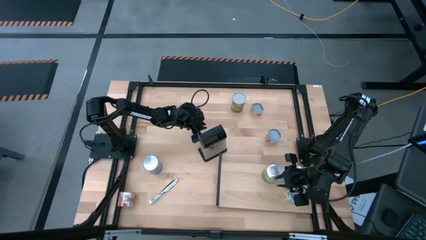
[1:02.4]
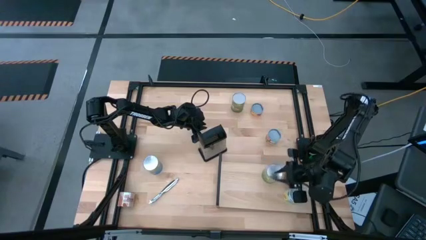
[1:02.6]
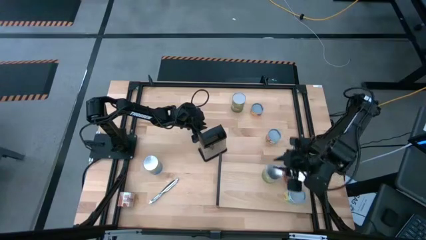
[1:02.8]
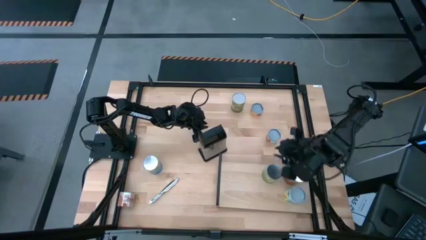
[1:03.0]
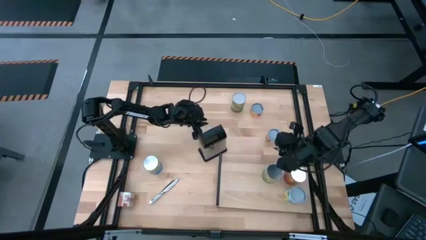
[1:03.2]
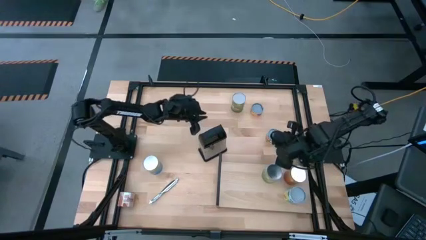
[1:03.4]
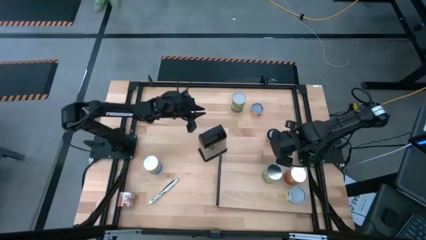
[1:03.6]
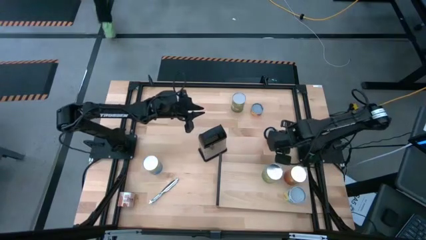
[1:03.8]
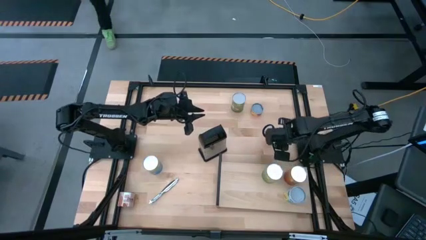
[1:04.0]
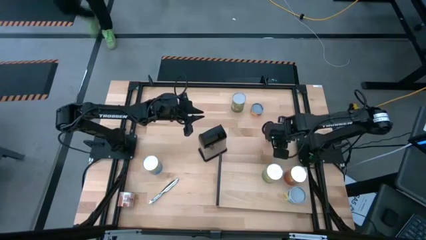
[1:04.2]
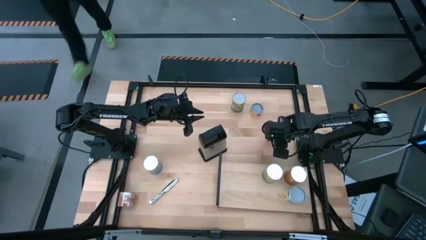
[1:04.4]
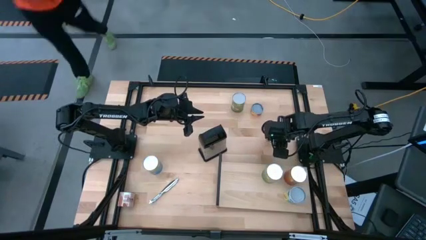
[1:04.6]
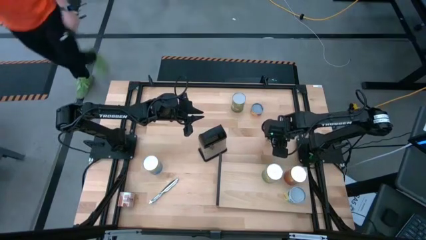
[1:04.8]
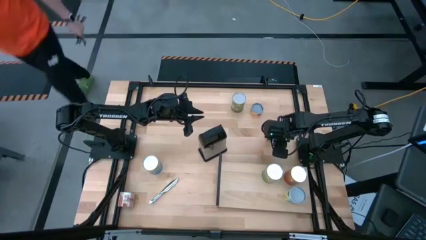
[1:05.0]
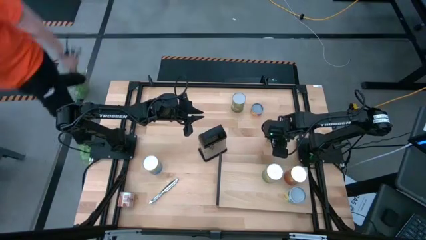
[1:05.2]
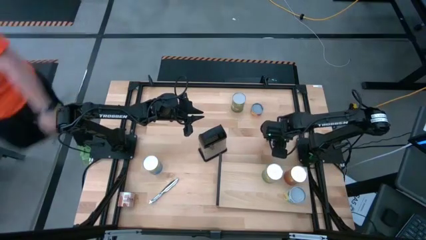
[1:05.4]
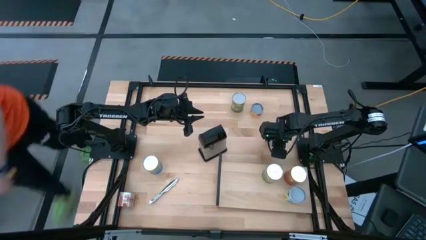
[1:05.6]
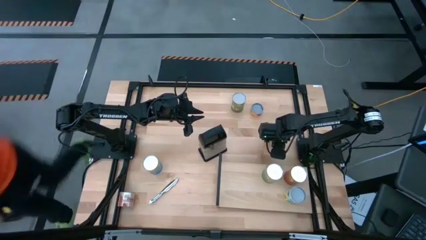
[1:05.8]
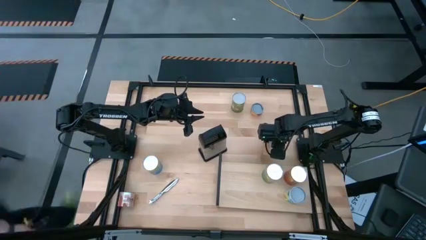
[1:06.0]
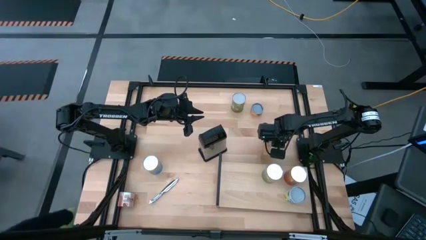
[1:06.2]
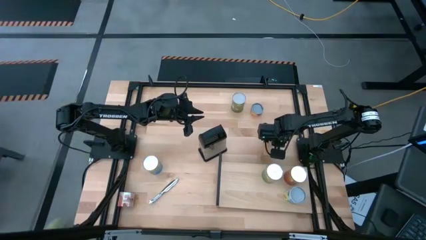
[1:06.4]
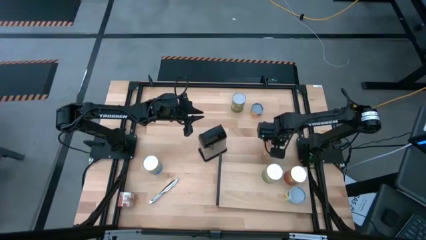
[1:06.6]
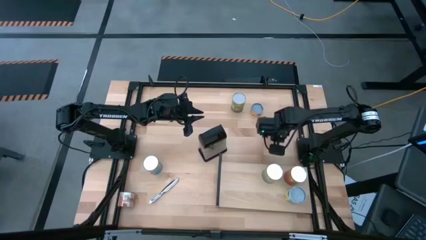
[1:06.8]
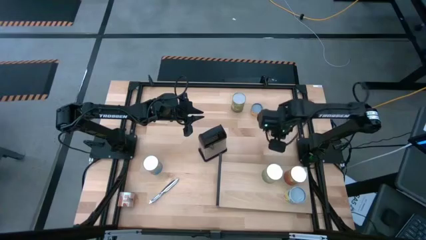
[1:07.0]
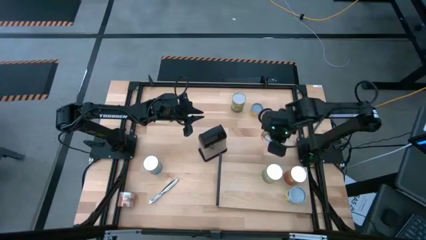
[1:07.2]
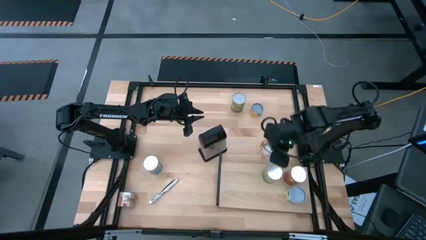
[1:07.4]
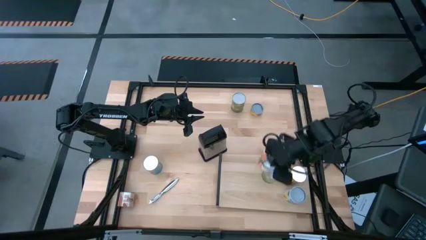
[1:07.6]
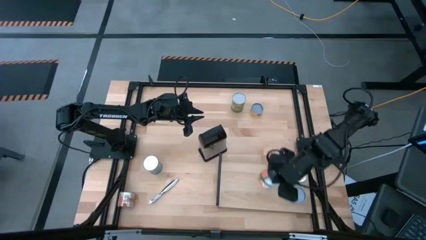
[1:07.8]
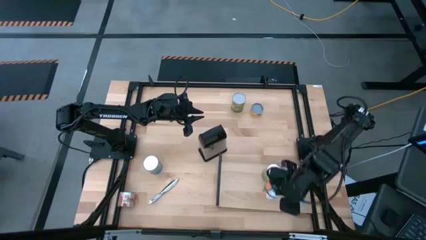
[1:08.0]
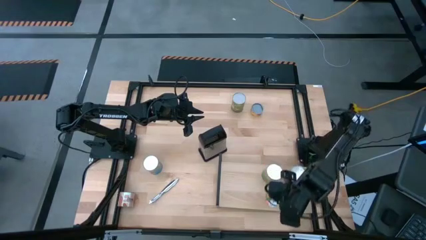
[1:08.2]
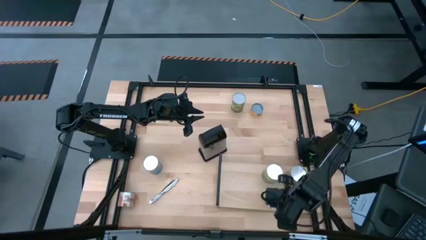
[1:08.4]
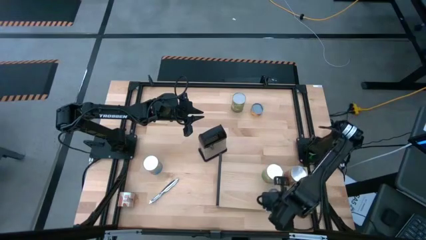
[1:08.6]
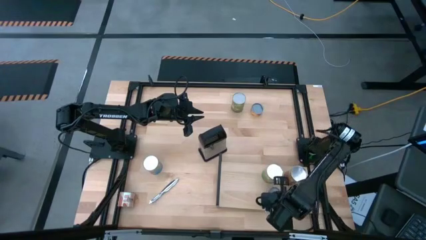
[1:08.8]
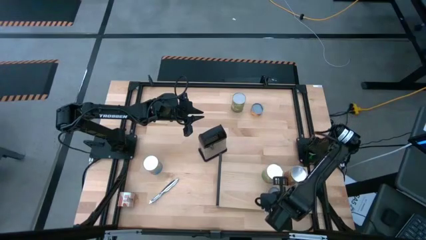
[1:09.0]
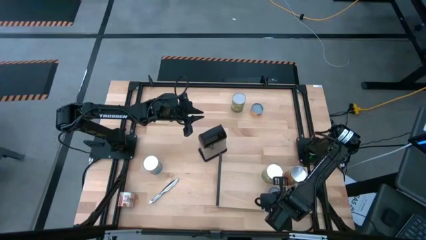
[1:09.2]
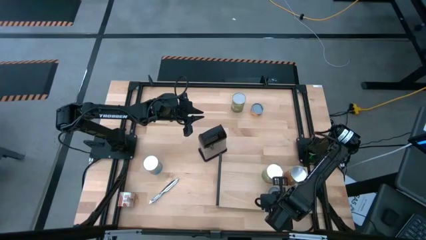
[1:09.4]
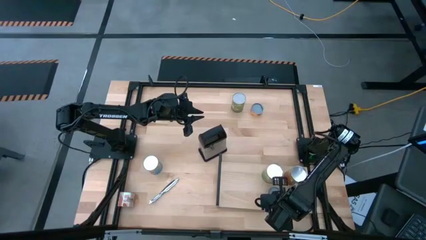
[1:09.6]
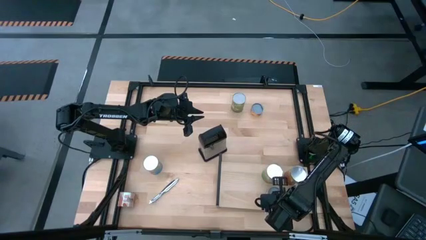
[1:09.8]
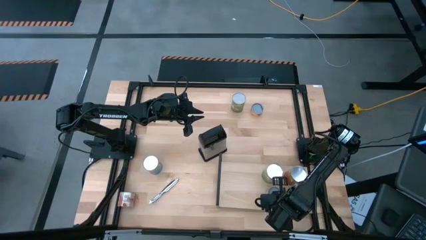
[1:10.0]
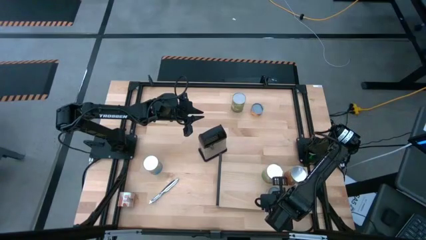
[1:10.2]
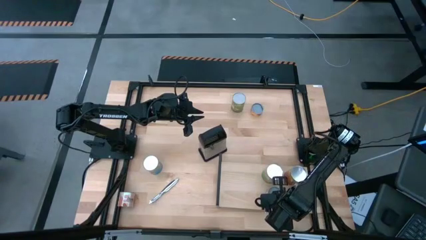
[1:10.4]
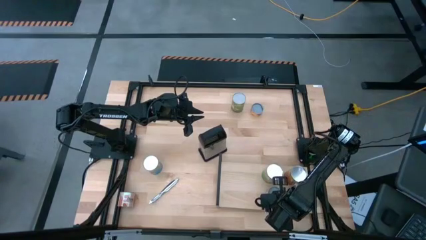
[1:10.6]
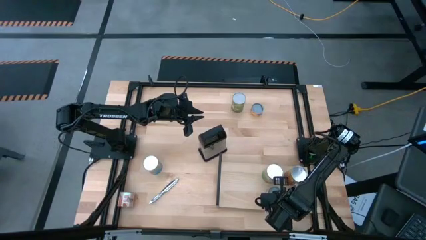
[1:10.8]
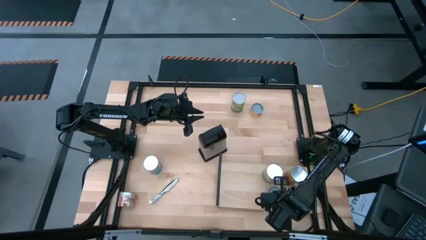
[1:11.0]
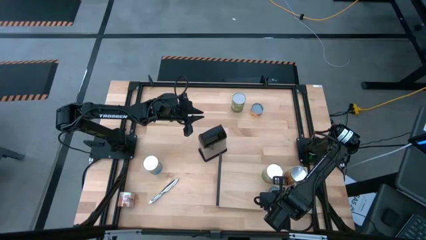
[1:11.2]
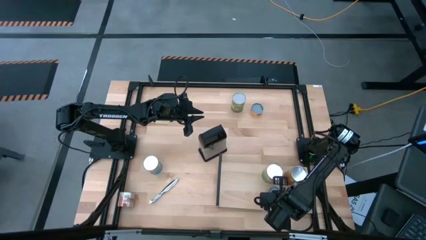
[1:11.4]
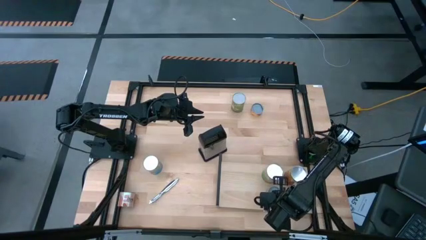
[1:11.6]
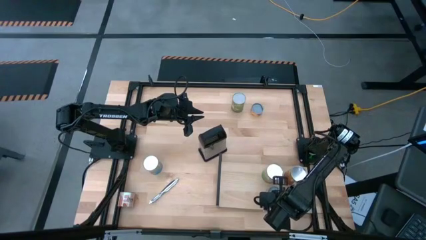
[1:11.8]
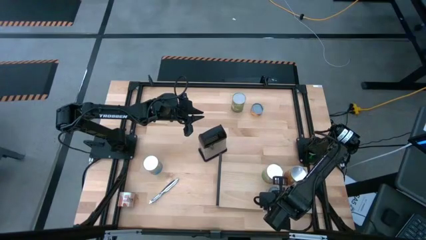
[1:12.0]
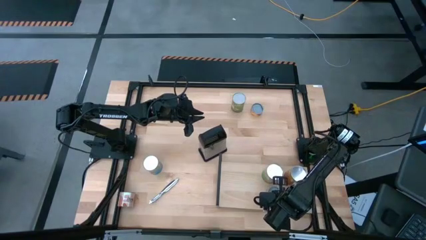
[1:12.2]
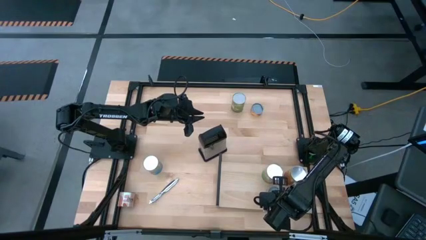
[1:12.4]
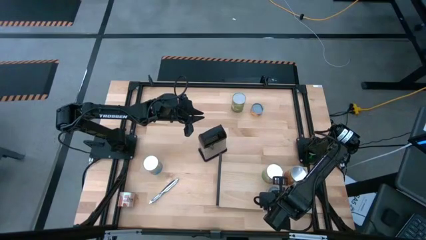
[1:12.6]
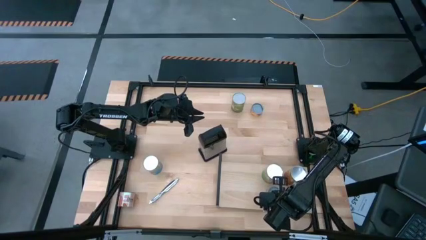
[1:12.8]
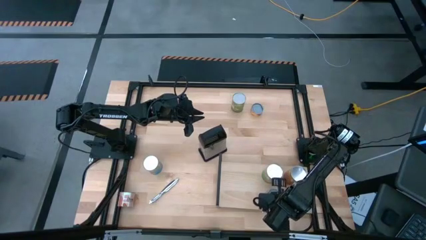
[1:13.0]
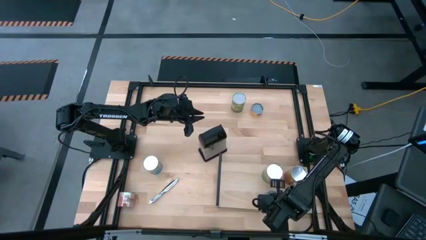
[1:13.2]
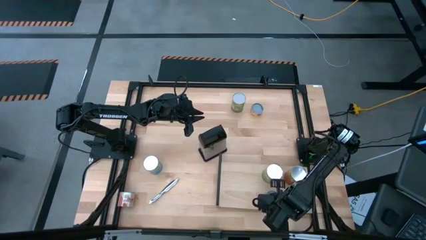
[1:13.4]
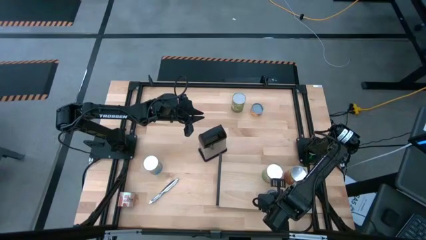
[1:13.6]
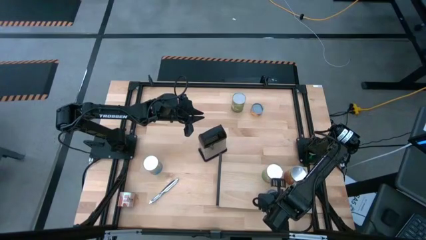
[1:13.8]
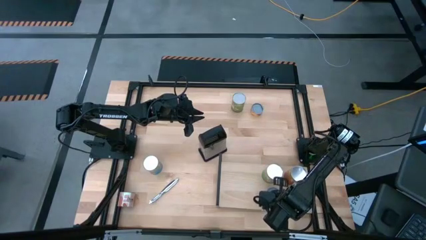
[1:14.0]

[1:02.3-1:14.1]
Task: Pick and place cans onto a shelf
Put the small canned oranges on the shelf
